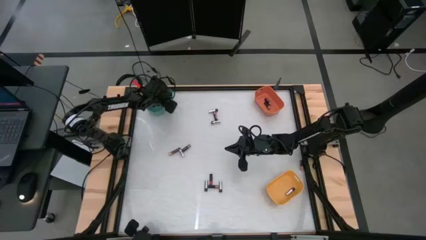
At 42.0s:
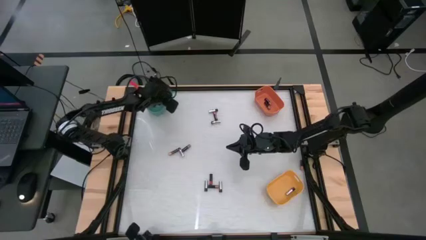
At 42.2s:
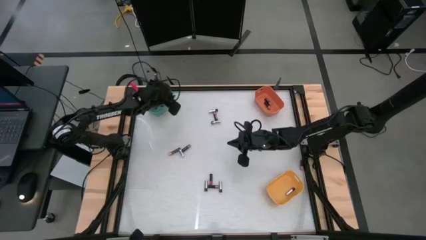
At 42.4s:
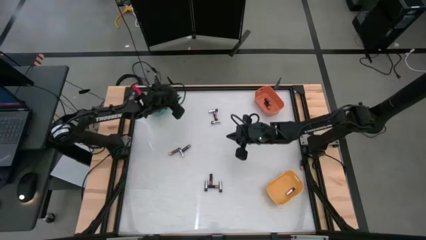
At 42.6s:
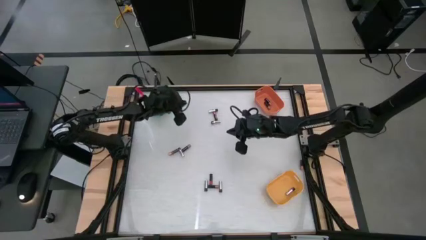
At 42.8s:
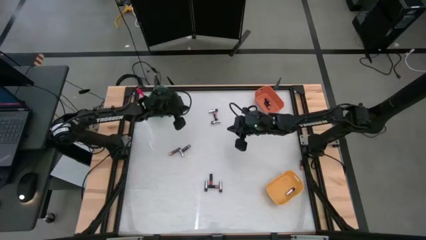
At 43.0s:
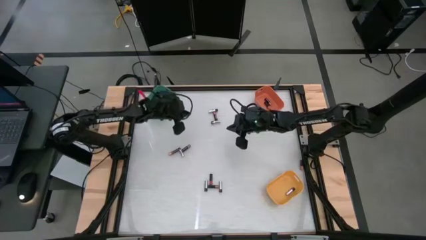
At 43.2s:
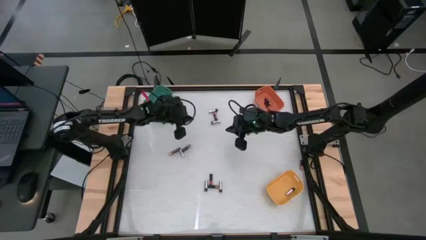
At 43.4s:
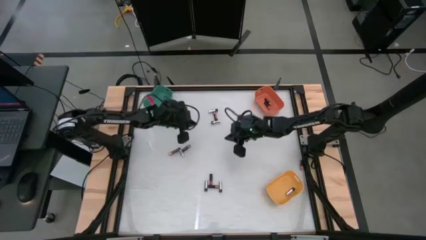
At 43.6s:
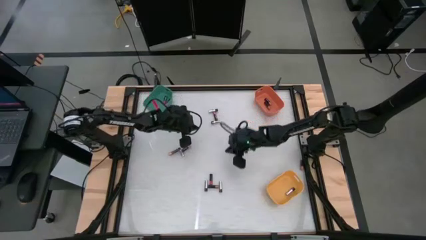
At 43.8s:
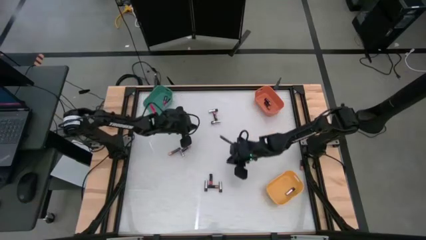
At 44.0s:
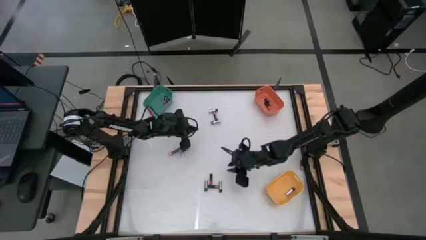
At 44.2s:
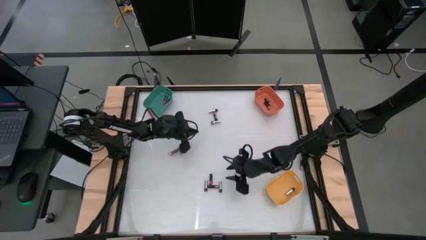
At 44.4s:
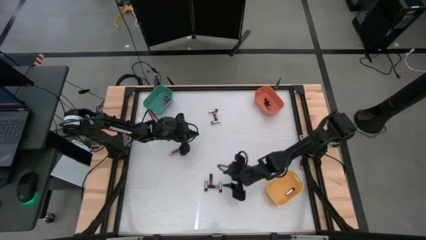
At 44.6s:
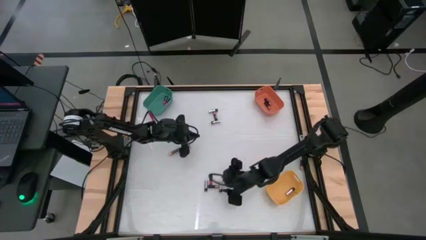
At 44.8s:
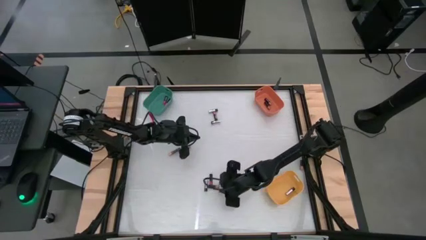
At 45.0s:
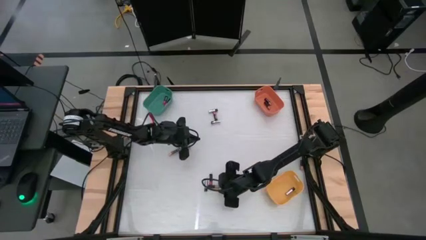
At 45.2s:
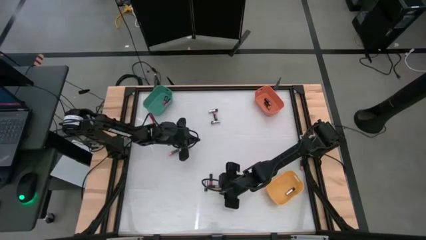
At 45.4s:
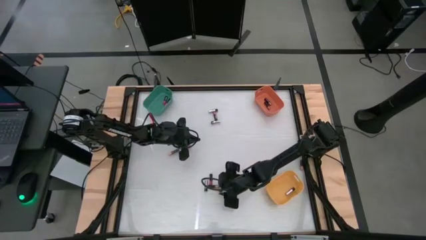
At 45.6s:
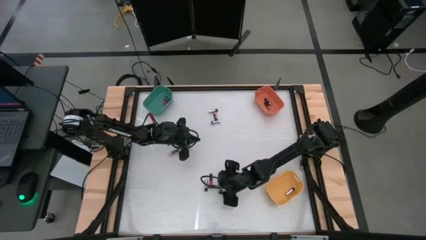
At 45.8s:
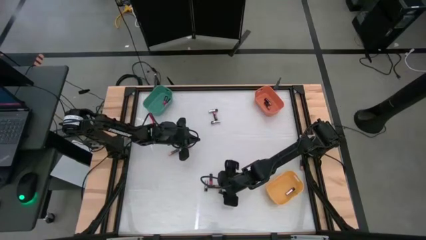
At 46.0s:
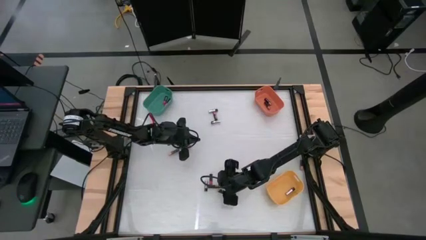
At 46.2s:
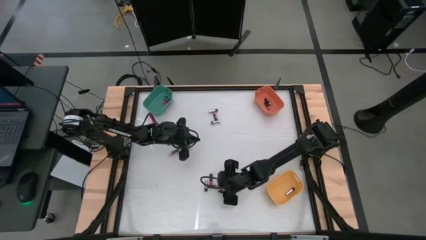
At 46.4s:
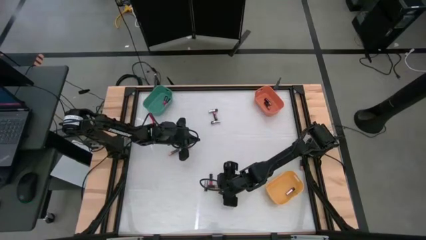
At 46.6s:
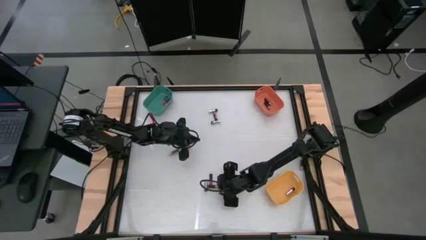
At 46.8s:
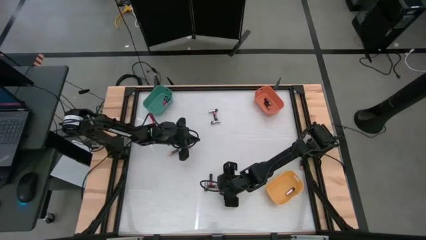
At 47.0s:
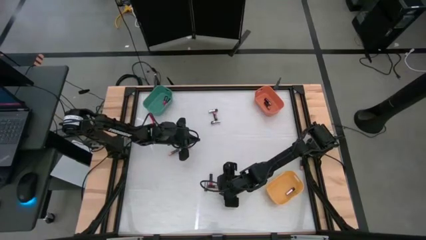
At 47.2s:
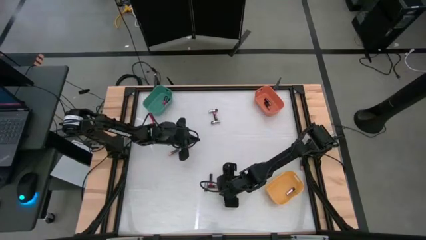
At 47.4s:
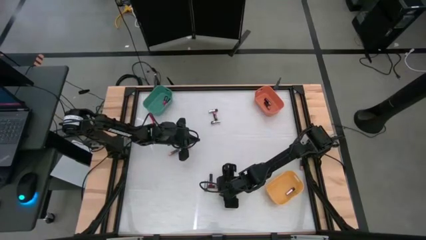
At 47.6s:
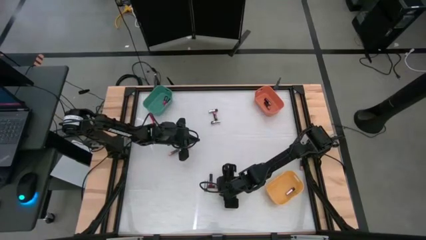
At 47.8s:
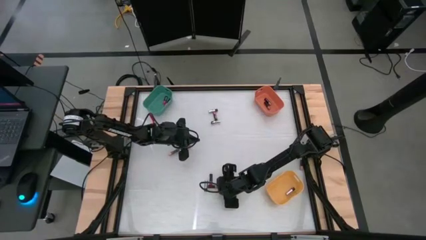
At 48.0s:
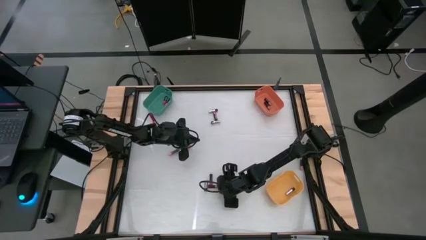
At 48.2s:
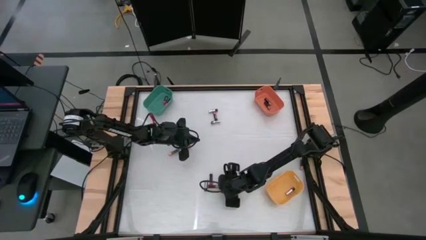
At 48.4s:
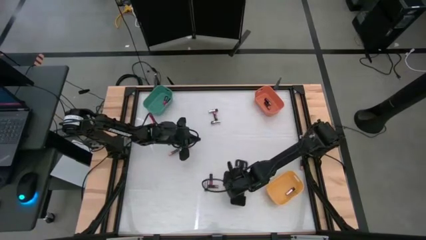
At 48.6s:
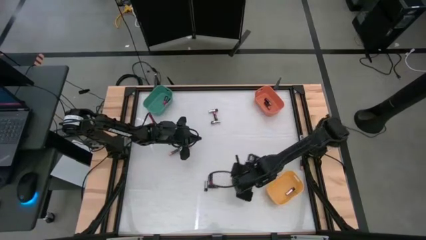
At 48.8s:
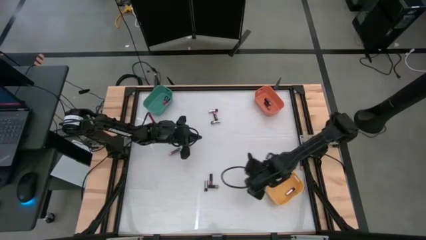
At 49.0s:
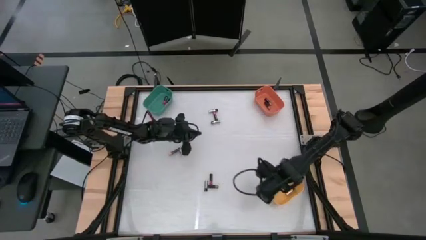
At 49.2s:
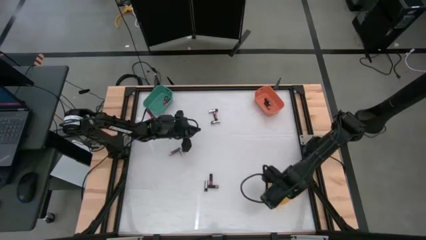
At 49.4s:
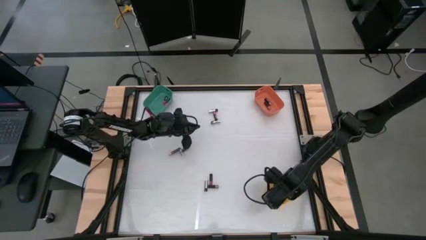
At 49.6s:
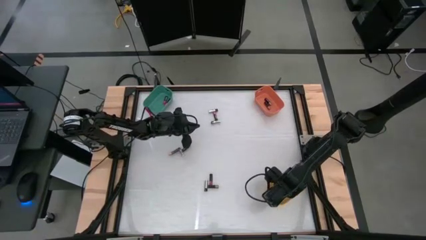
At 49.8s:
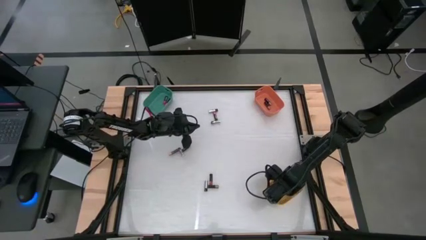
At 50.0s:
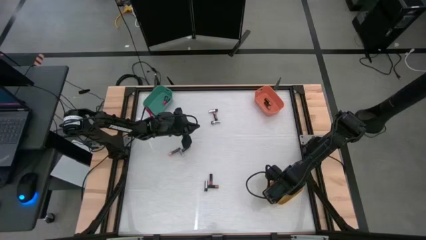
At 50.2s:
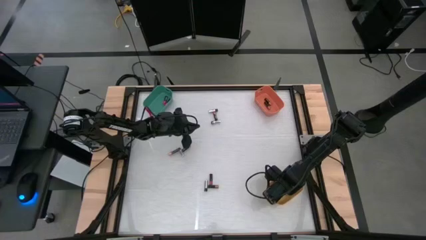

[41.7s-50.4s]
Task: Sort batteries
Put the silver battery into the yellow bin

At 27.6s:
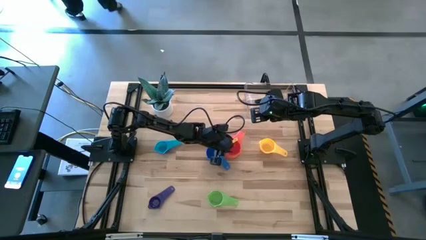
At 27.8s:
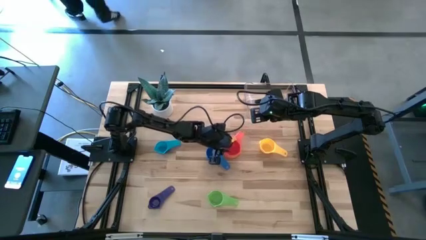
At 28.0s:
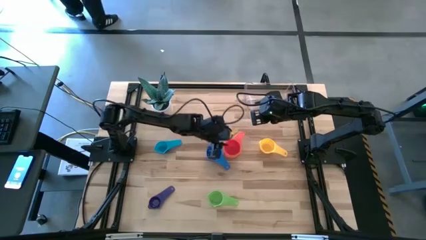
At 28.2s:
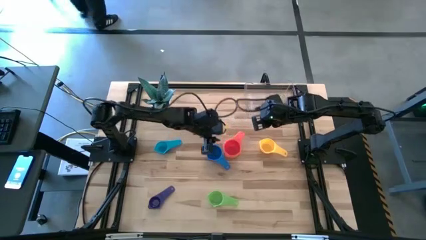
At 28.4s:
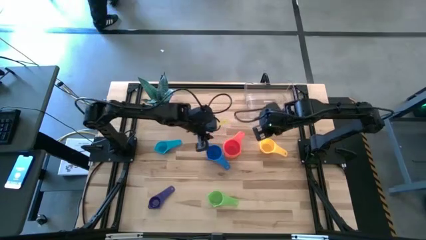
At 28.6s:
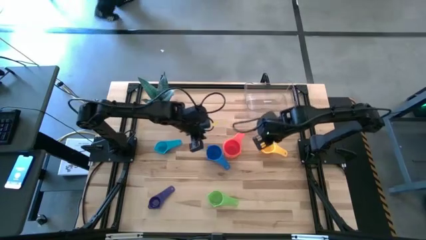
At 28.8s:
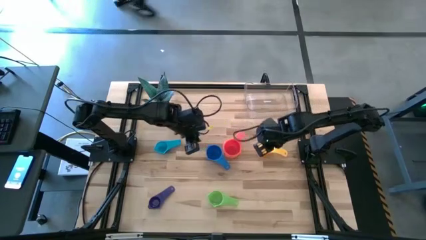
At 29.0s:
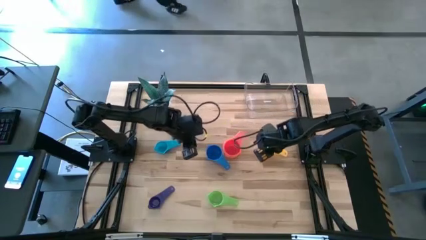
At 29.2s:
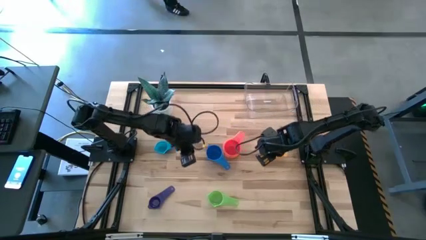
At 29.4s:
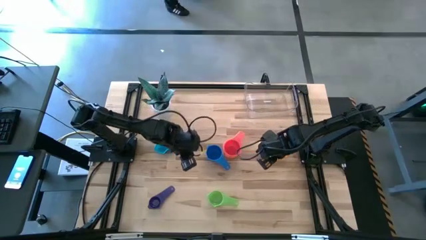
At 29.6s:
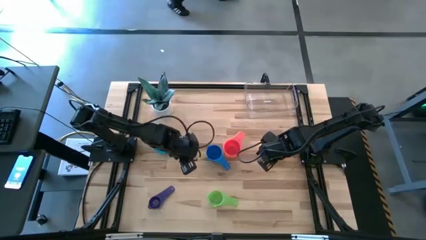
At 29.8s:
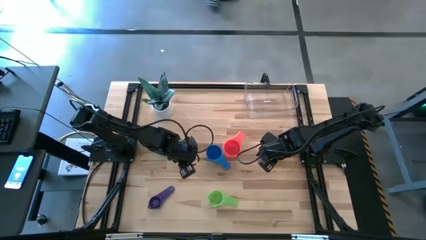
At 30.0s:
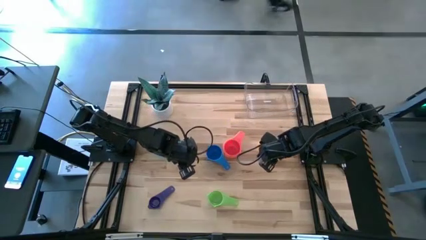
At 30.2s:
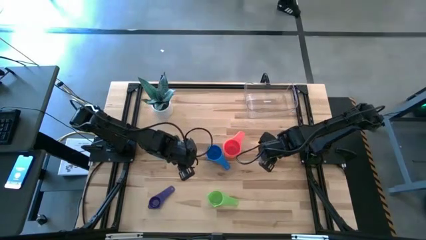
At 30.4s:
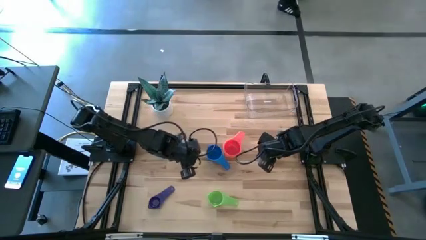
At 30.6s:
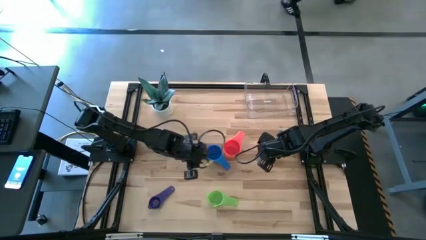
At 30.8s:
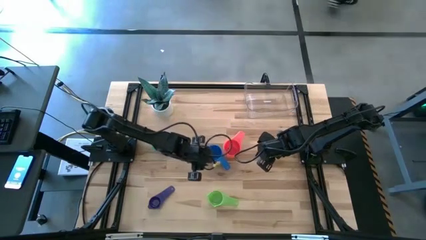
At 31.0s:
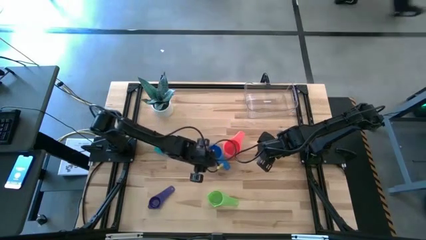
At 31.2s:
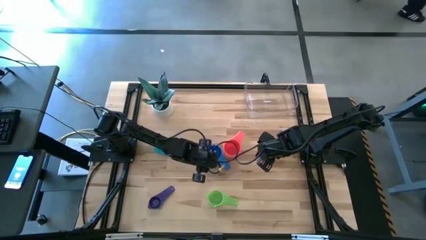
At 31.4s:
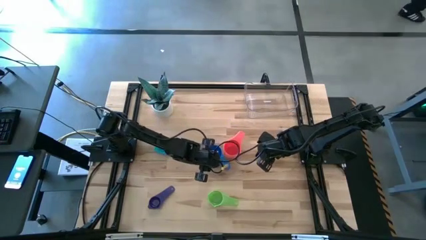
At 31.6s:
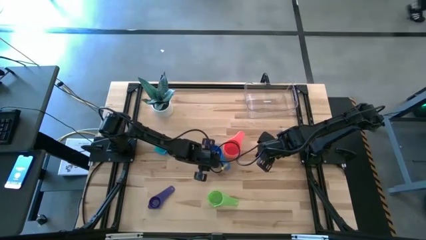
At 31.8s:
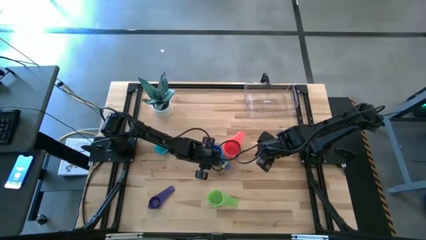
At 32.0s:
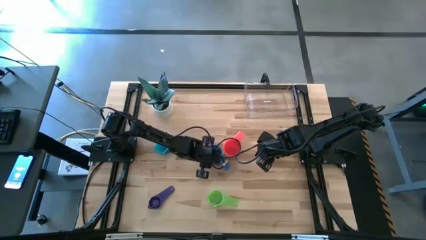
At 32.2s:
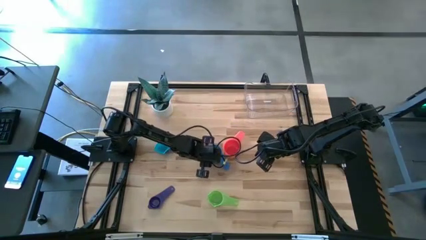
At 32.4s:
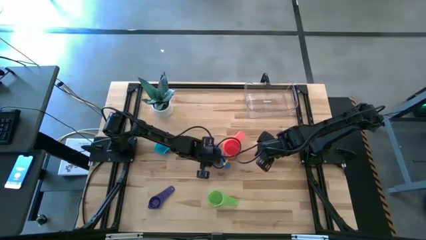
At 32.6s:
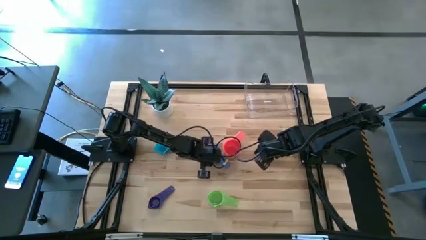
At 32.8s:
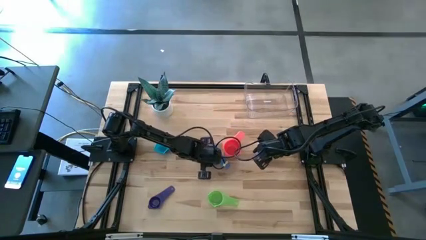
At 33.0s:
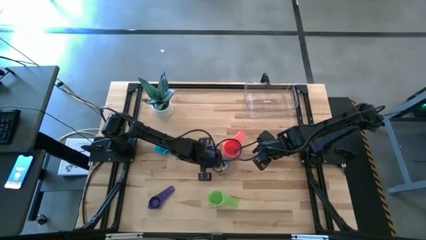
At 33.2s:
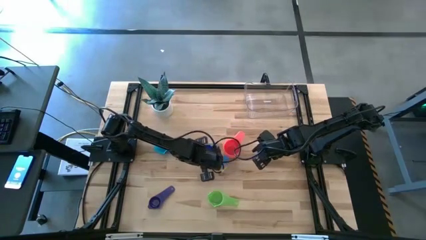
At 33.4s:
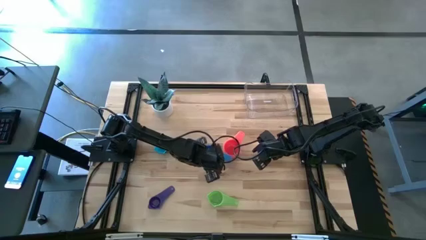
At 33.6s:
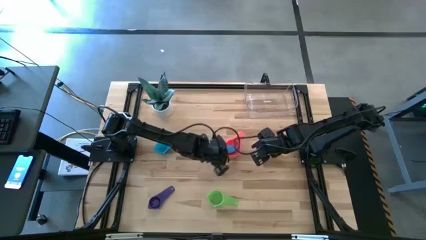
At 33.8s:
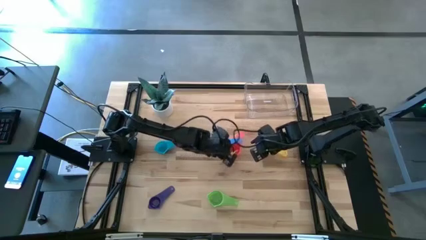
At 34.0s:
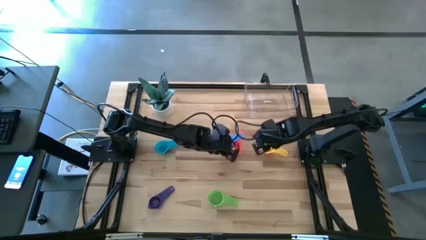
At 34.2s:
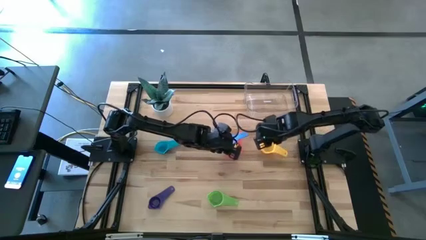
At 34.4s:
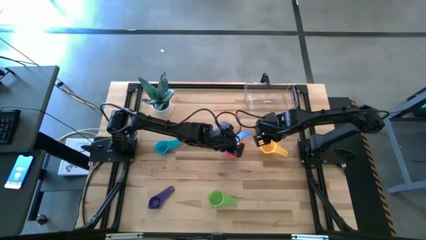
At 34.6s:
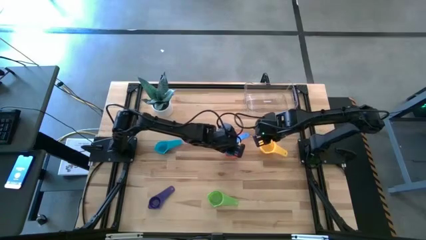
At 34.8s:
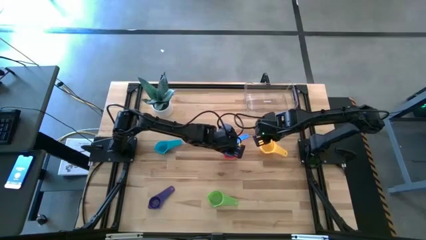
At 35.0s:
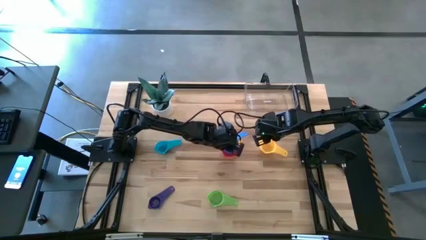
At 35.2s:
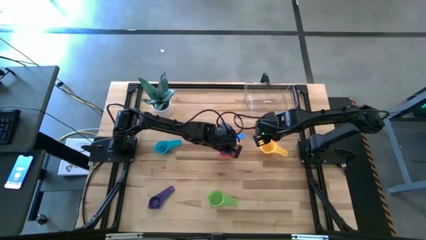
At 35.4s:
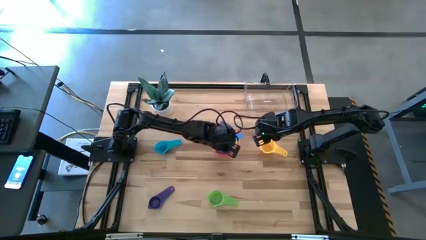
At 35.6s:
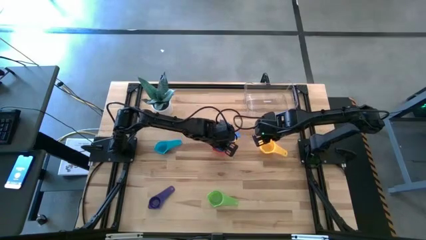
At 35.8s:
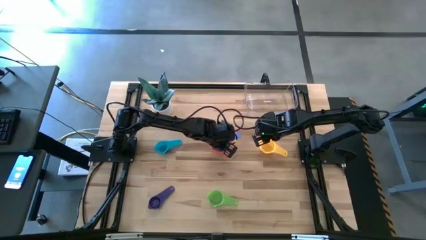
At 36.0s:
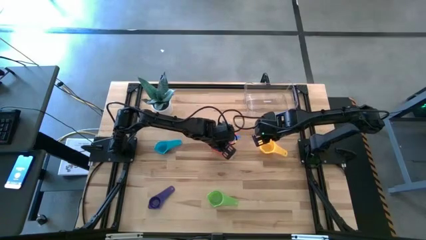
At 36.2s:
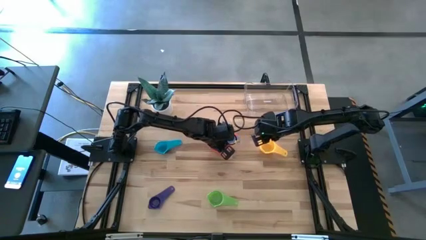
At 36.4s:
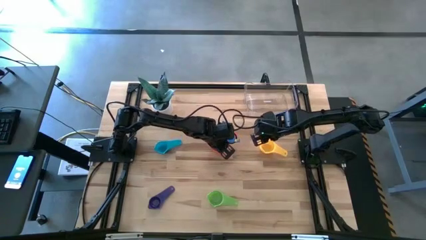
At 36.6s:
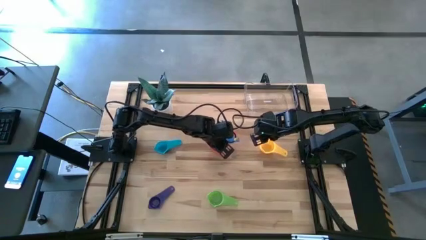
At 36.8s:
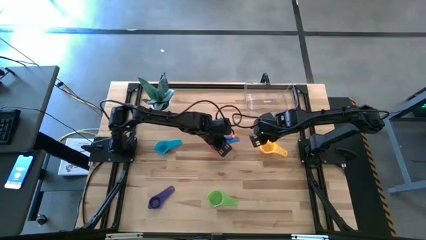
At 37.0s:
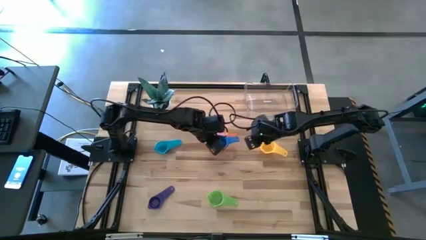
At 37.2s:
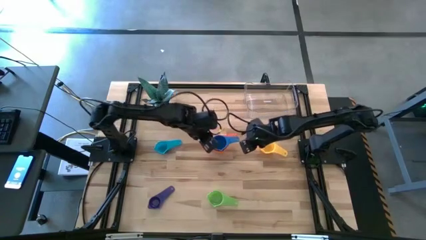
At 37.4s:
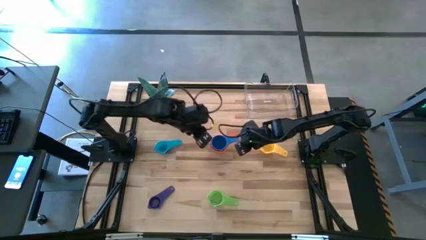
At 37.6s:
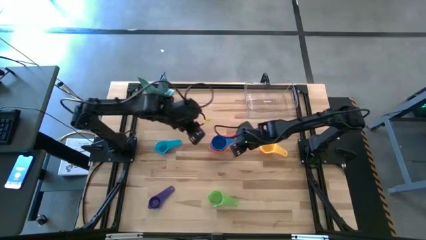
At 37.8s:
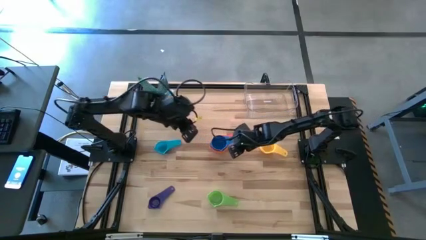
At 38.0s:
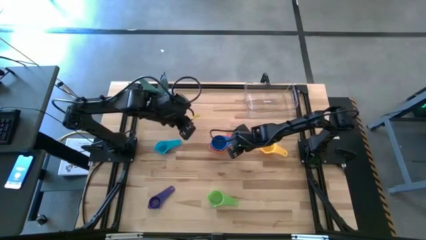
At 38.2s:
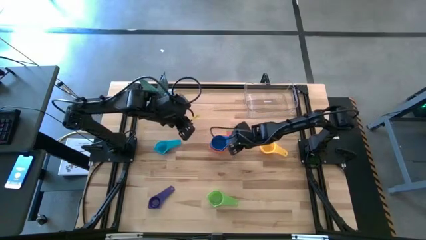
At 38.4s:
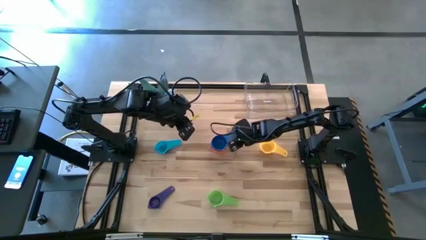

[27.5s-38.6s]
Task: Nest measuring cups in basket
Stack the dark blue measuring cup on top of the red measuring cup
